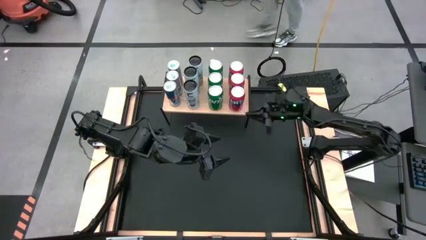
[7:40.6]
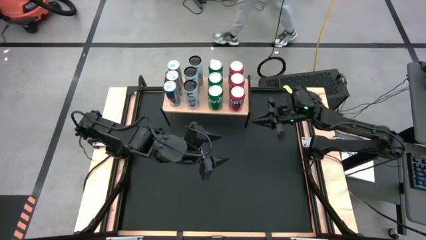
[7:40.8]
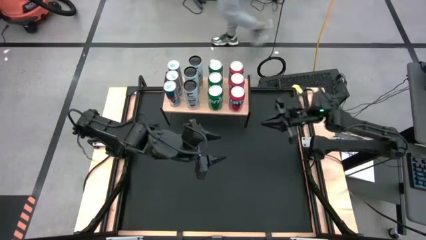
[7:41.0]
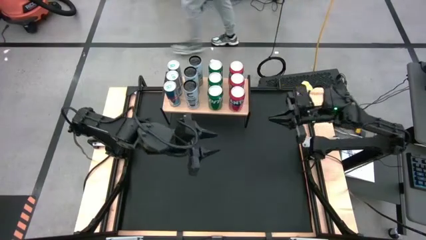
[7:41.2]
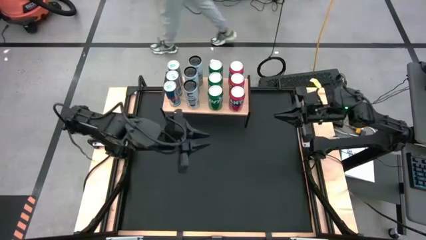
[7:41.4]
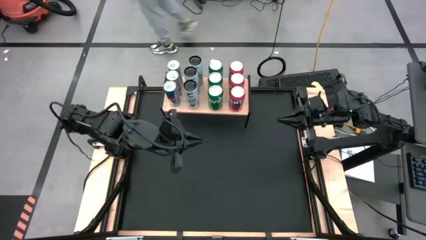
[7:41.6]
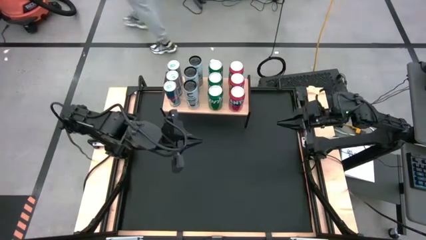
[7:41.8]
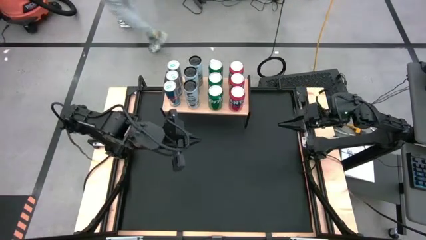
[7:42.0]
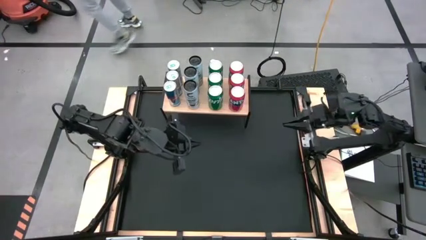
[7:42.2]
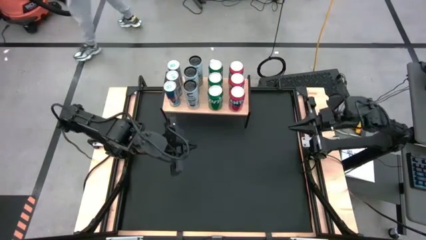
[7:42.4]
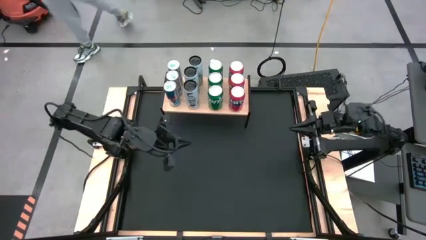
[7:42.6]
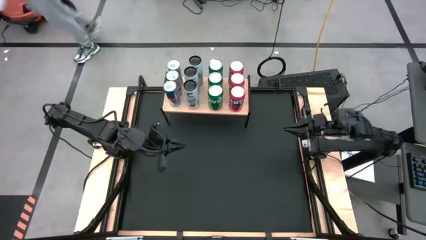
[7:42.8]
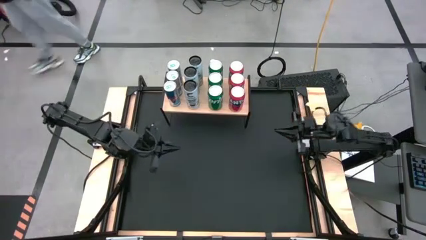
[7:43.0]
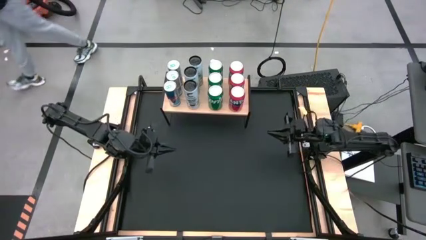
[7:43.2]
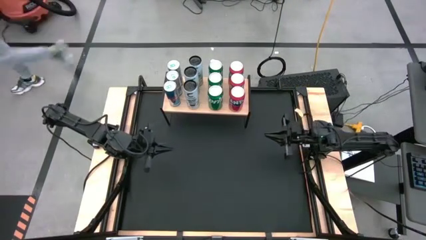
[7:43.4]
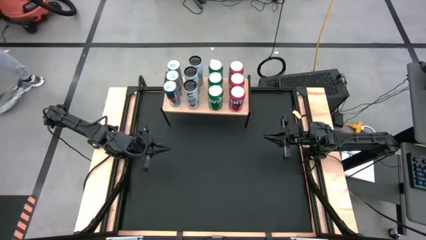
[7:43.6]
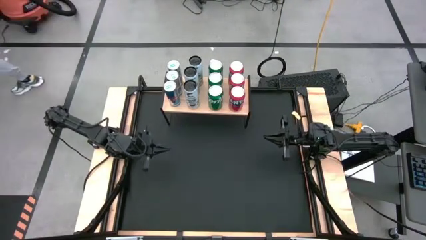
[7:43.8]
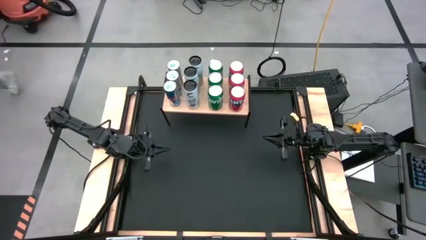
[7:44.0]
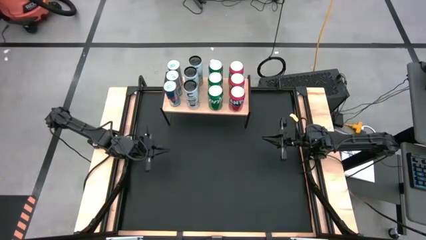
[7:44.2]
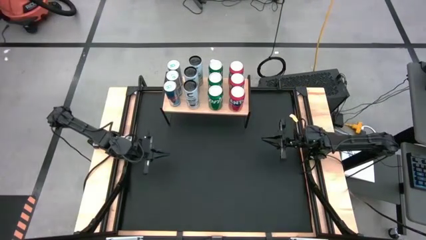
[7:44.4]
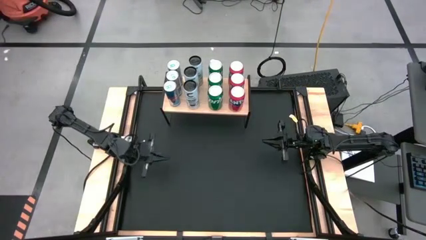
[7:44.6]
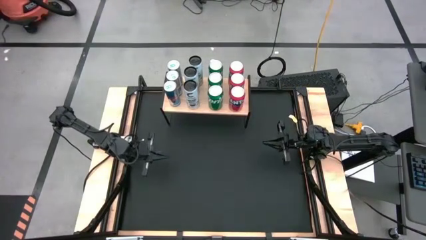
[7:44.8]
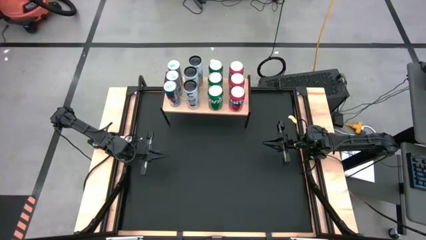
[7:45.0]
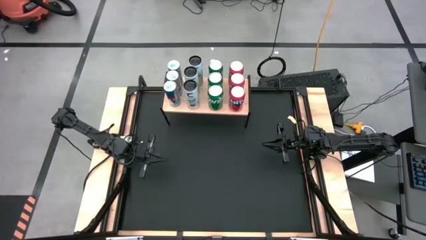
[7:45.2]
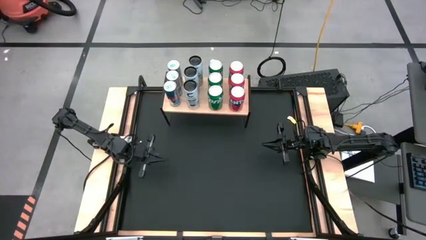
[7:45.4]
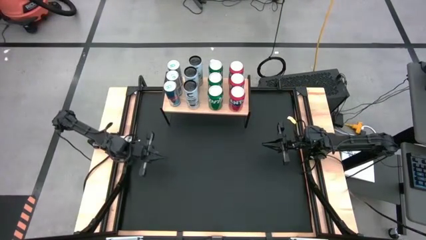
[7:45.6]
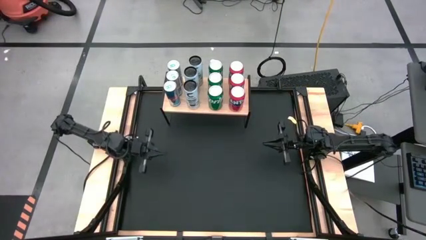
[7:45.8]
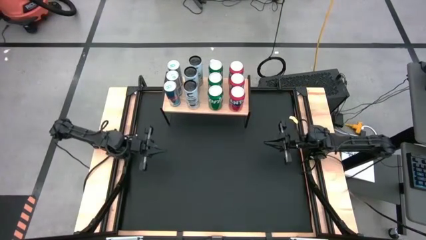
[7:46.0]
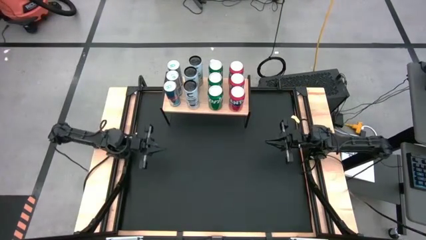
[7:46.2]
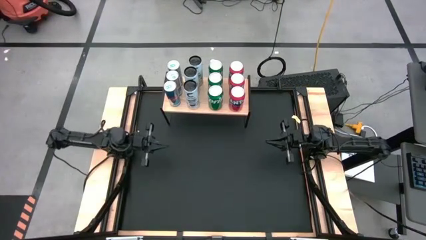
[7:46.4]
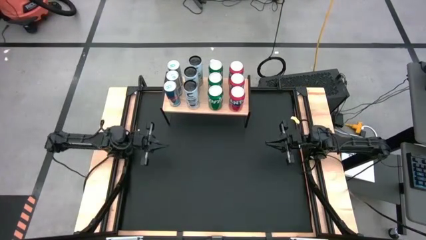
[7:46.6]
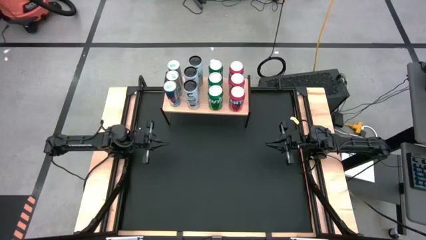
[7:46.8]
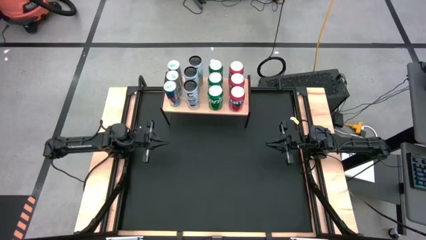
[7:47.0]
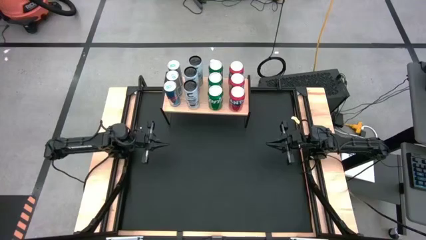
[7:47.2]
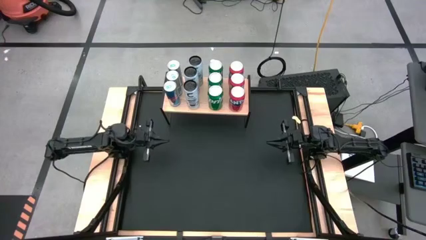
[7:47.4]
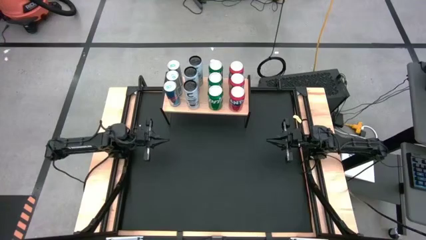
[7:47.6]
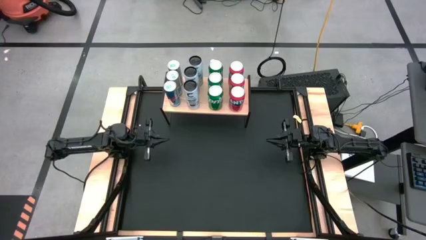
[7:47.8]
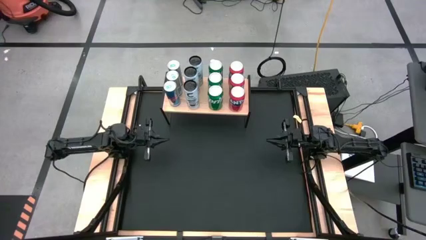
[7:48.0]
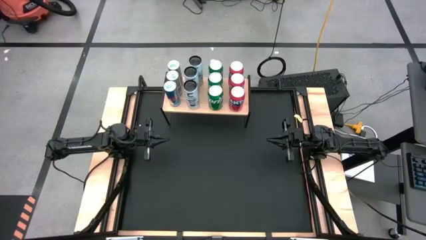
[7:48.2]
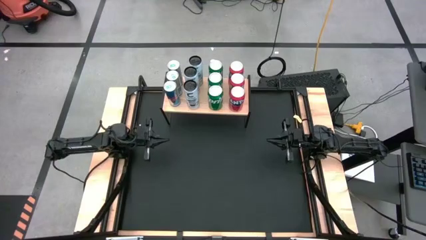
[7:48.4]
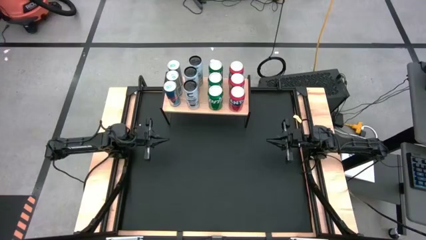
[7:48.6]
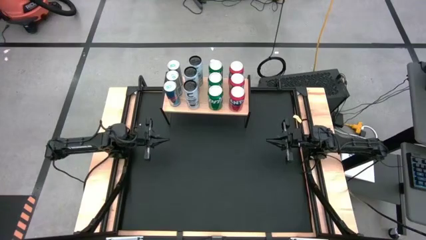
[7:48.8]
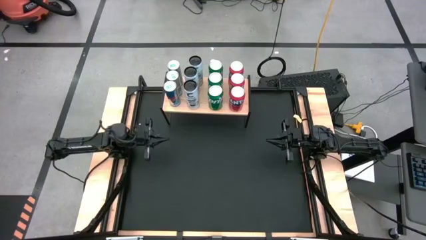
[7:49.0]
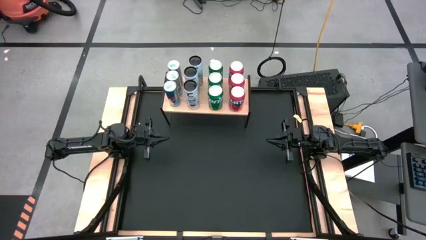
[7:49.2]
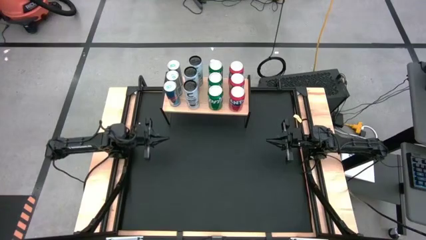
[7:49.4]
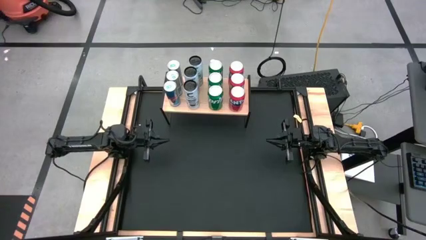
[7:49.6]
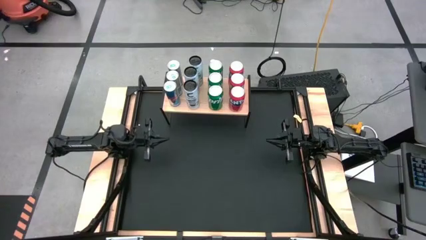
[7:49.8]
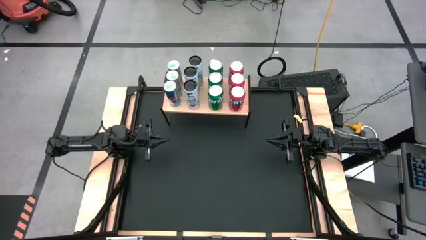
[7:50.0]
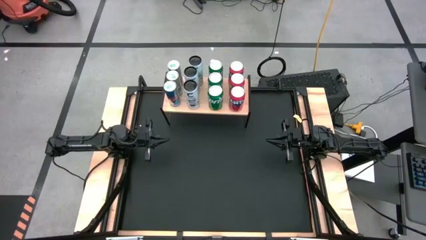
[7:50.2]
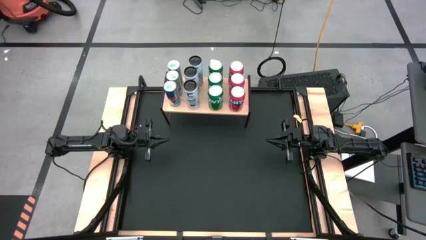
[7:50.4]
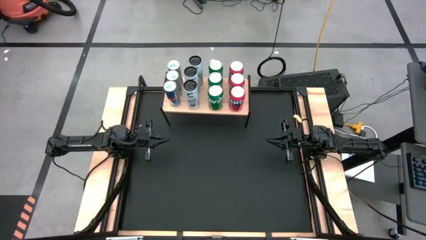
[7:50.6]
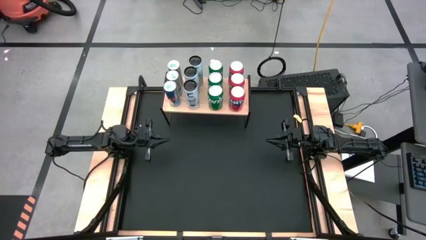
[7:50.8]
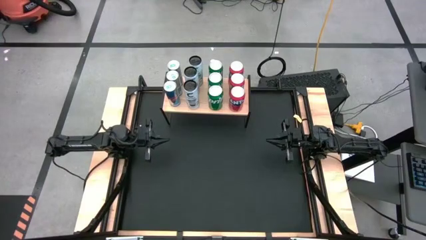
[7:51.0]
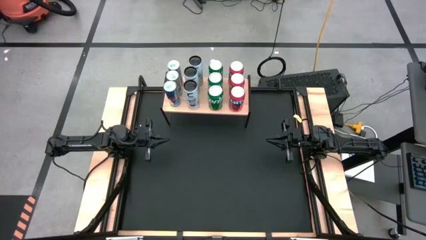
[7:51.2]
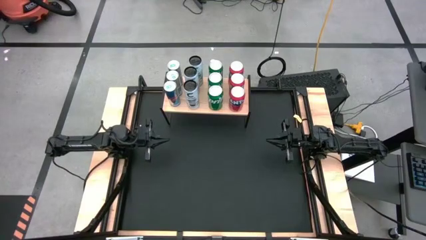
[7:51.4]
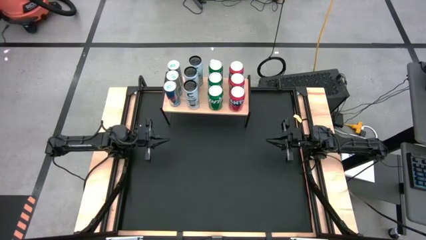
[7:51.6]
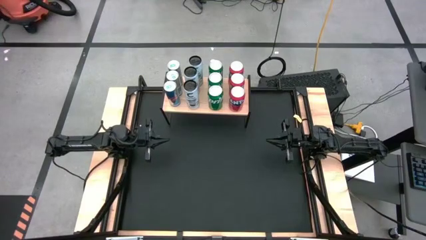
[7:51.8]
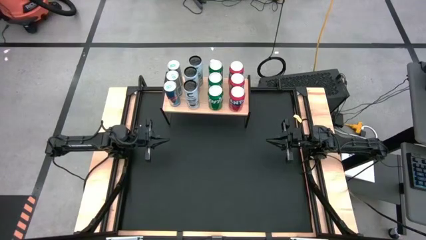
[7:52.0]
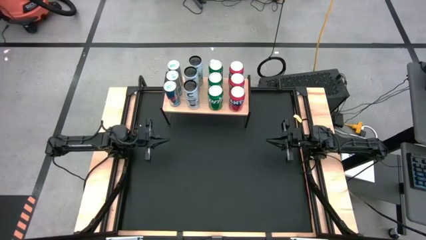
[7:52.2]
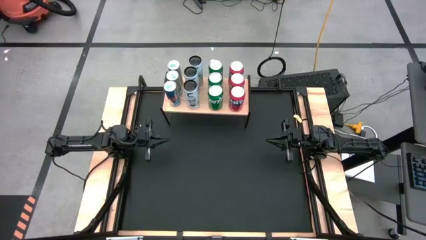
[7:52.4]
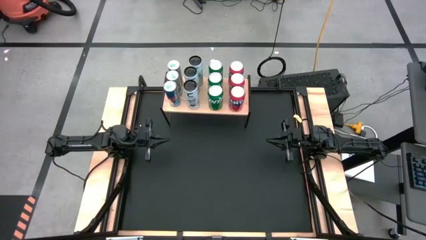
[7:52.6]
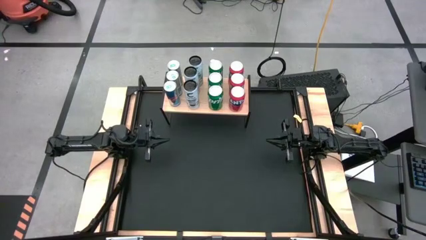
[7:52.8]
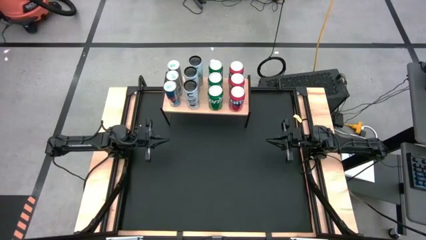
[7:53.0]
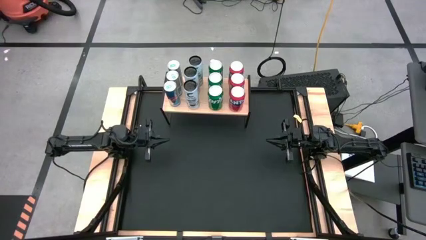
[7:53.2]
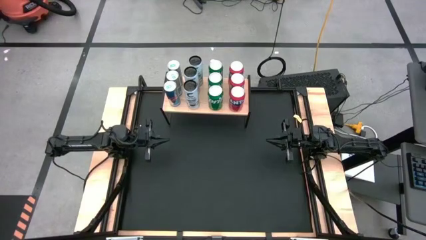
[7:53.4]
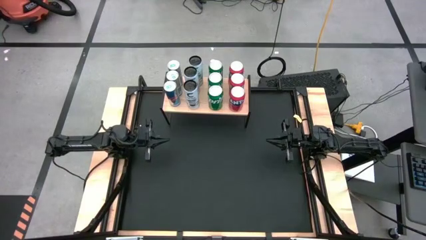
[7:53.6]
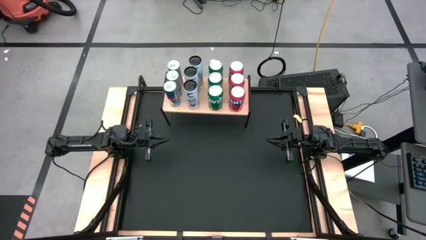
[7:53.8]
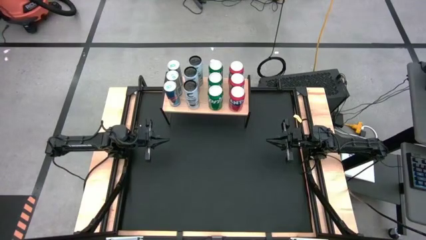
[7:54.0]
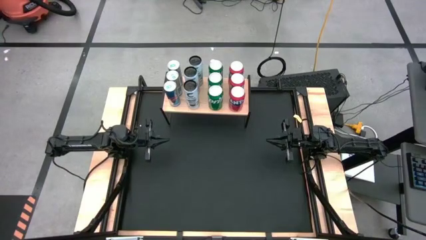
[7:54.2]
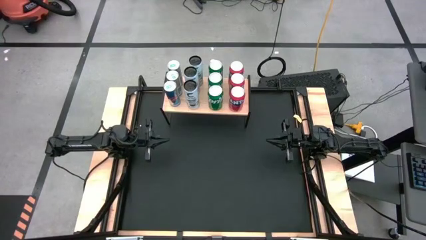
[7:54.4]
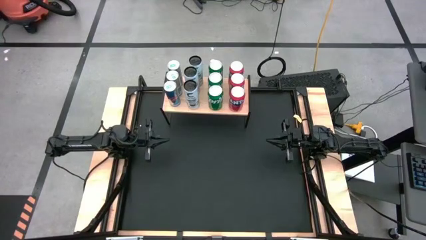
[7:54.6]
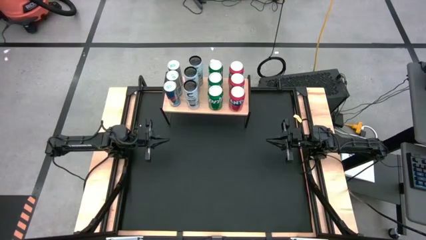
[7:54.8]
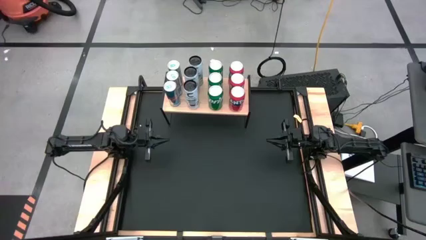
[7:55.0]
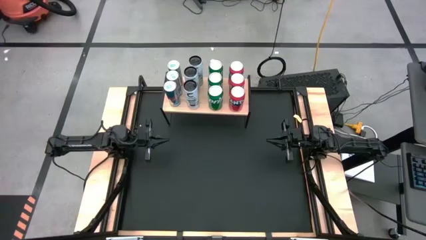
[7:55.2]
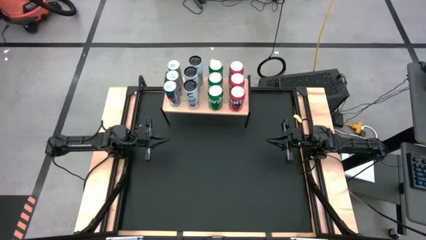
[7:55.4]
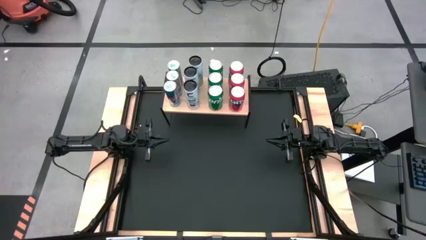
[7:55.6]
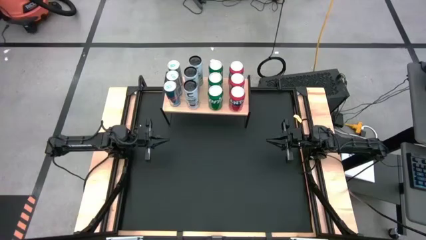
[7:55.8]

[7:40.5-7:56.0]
Task: Place canned beverage on shelf
Return to Home Position
